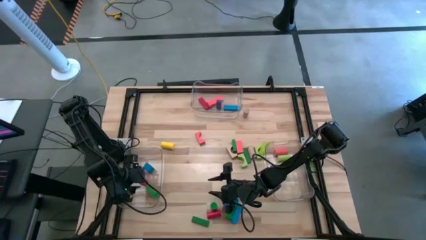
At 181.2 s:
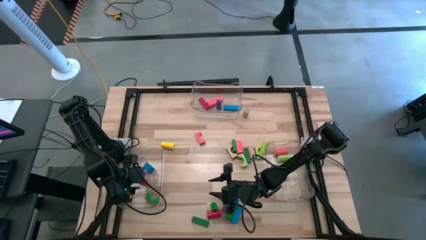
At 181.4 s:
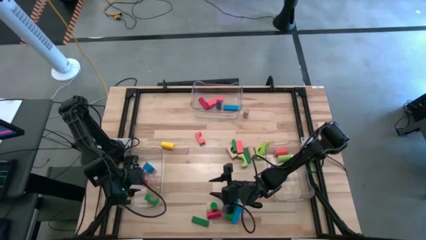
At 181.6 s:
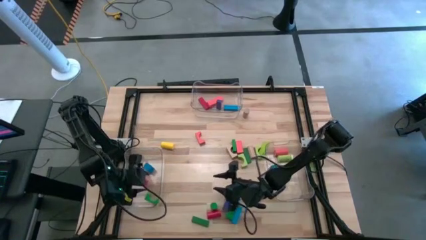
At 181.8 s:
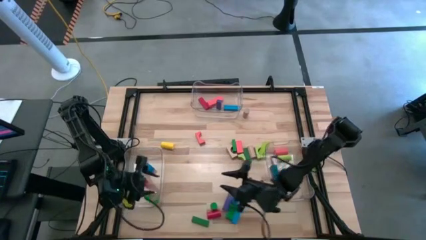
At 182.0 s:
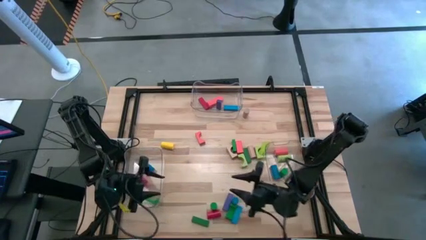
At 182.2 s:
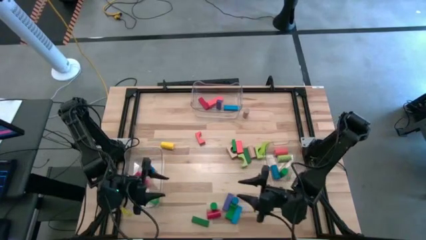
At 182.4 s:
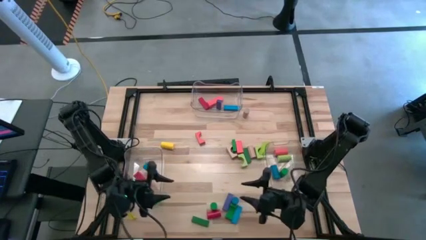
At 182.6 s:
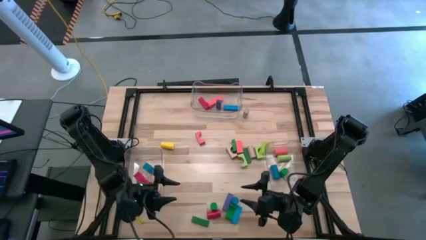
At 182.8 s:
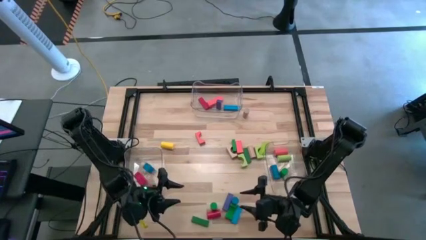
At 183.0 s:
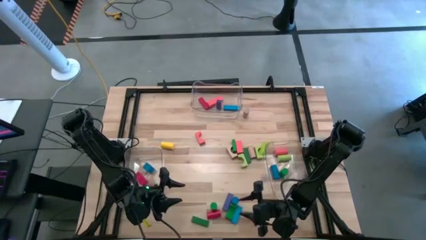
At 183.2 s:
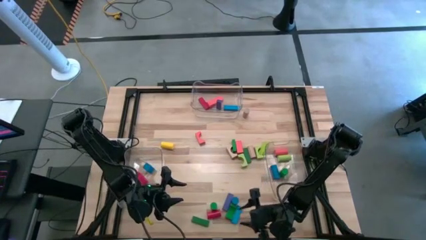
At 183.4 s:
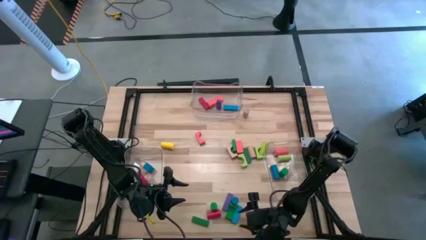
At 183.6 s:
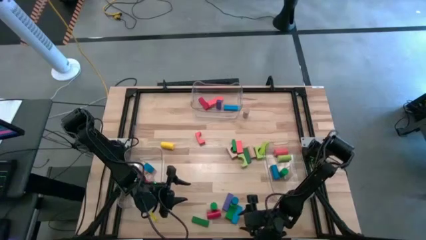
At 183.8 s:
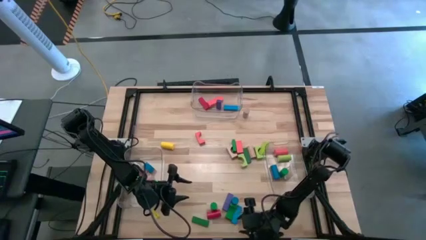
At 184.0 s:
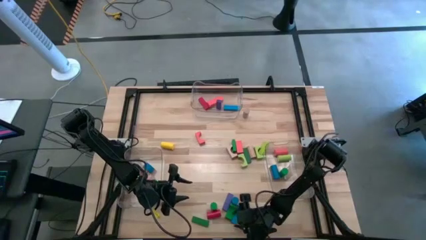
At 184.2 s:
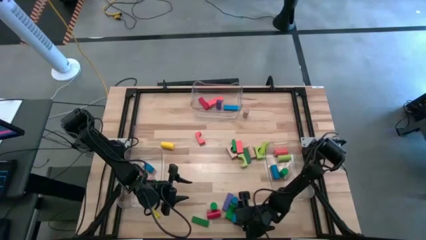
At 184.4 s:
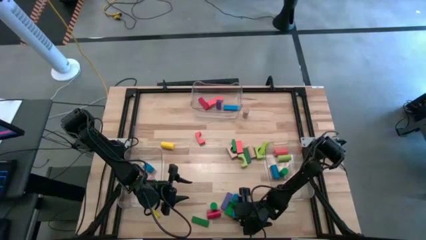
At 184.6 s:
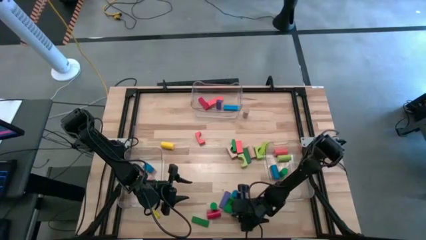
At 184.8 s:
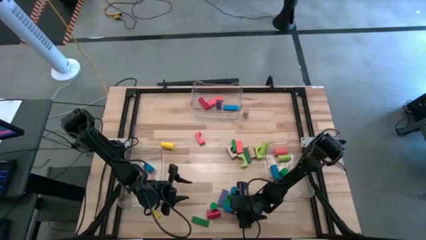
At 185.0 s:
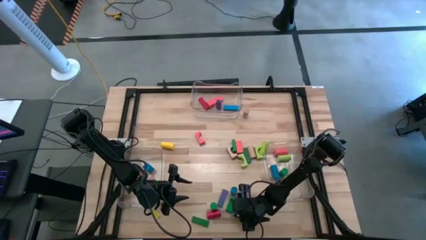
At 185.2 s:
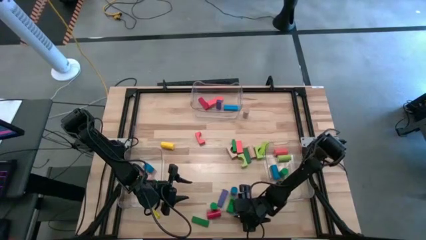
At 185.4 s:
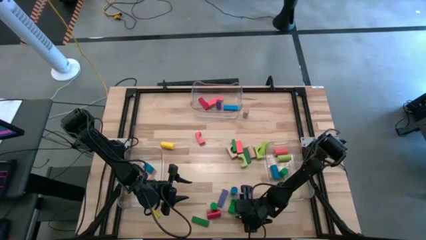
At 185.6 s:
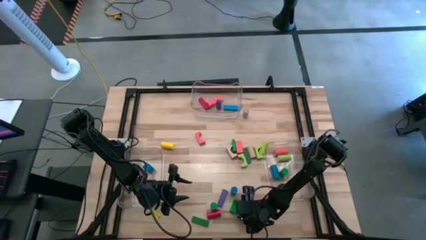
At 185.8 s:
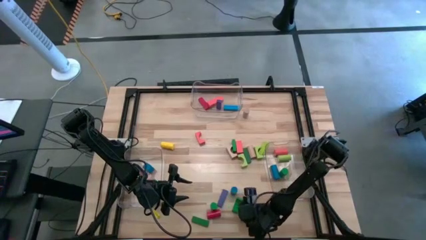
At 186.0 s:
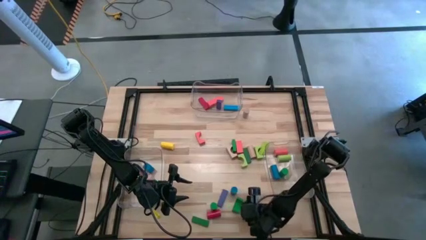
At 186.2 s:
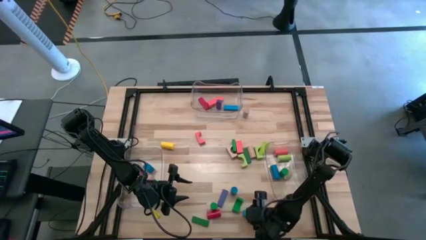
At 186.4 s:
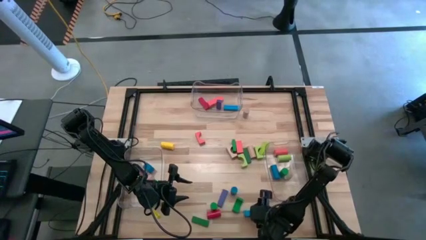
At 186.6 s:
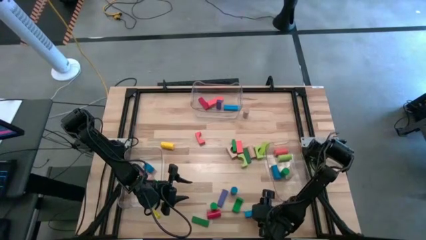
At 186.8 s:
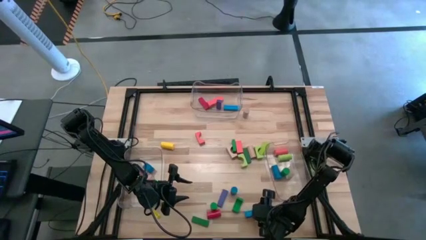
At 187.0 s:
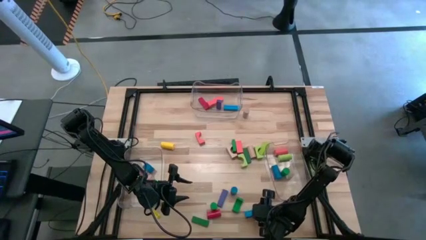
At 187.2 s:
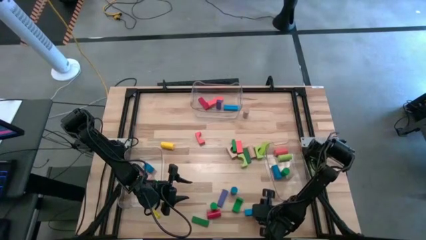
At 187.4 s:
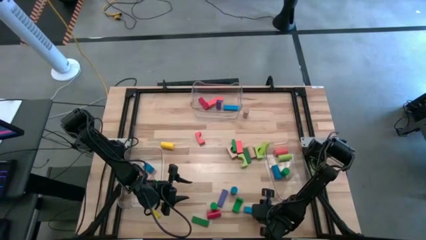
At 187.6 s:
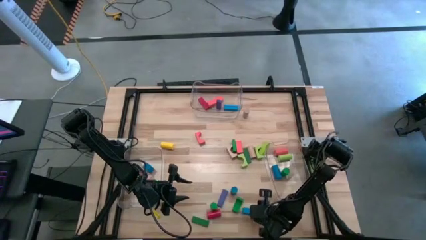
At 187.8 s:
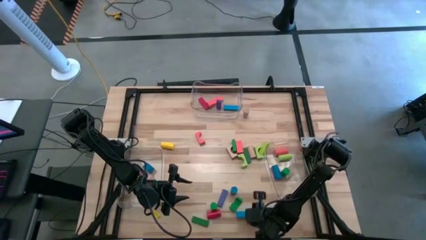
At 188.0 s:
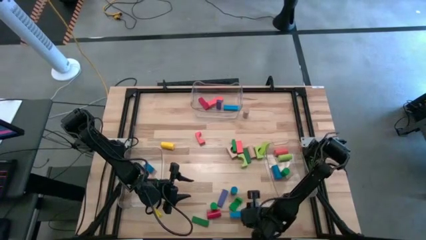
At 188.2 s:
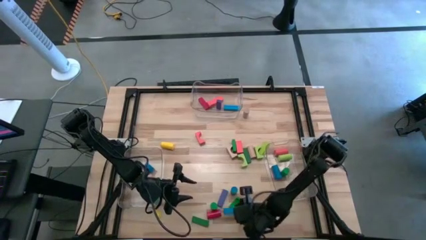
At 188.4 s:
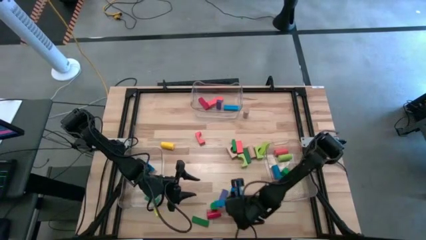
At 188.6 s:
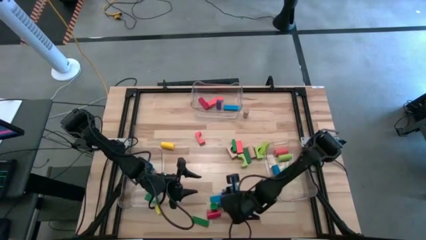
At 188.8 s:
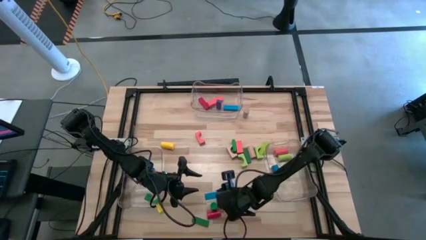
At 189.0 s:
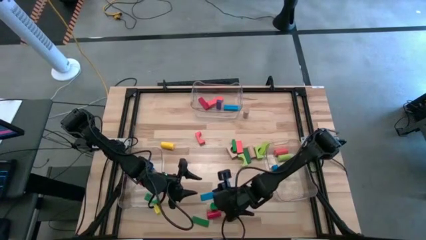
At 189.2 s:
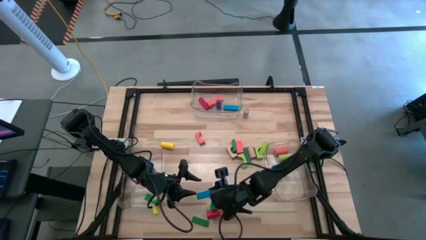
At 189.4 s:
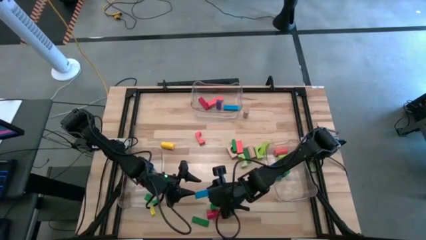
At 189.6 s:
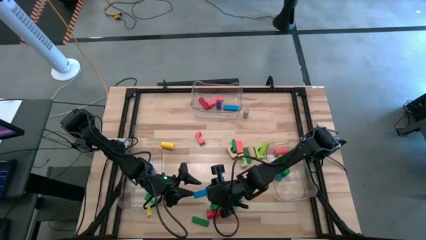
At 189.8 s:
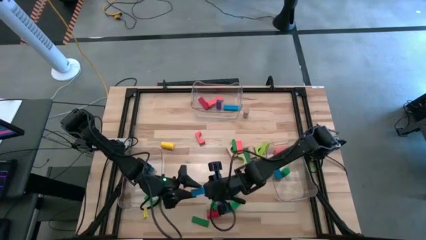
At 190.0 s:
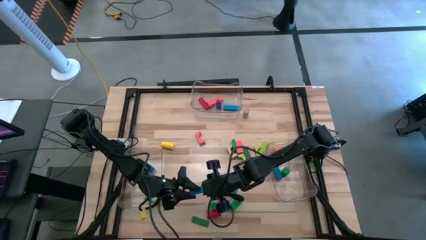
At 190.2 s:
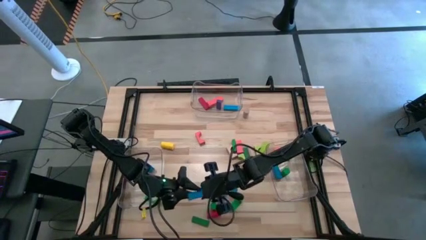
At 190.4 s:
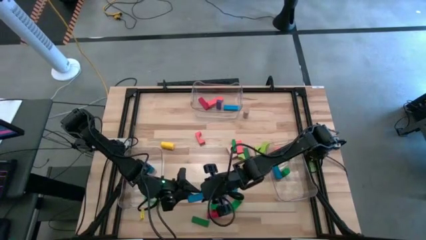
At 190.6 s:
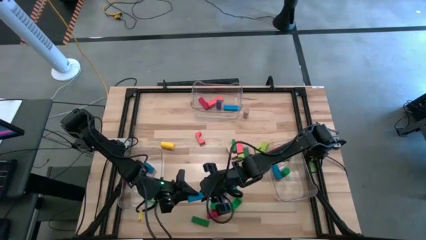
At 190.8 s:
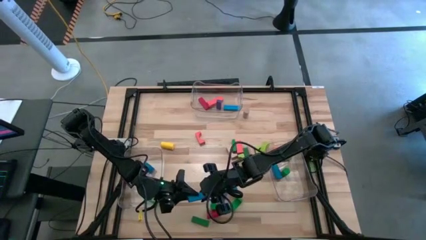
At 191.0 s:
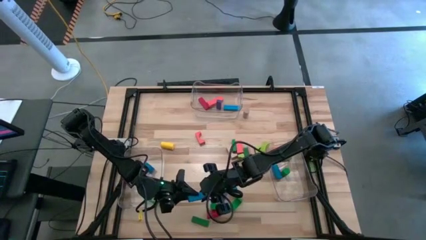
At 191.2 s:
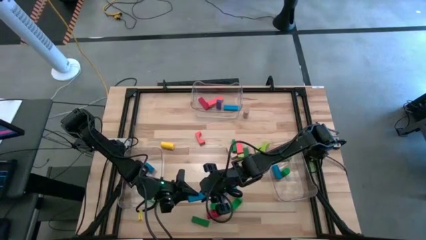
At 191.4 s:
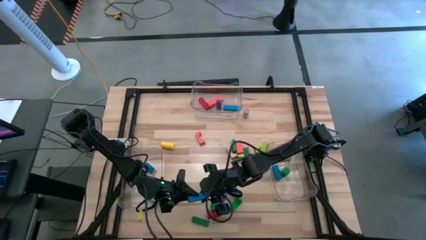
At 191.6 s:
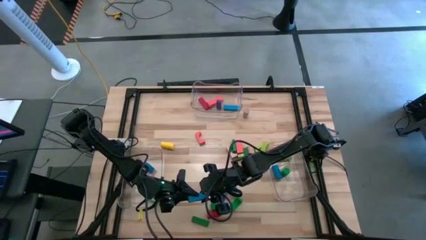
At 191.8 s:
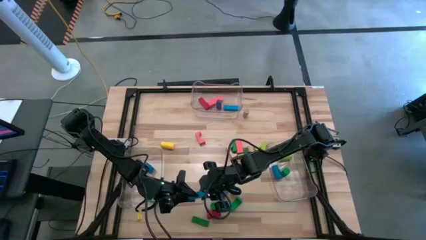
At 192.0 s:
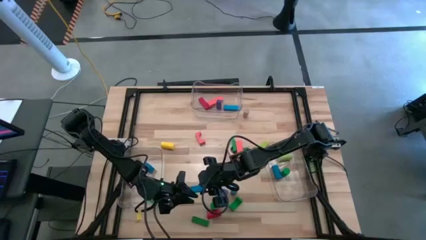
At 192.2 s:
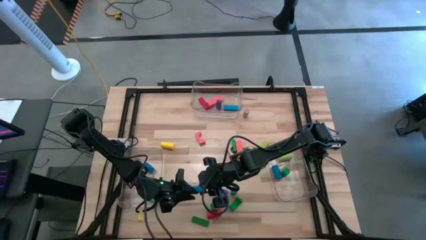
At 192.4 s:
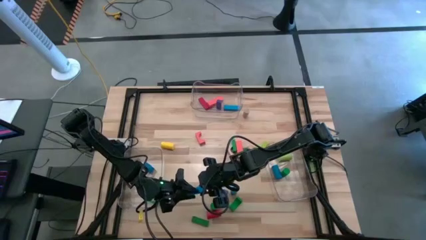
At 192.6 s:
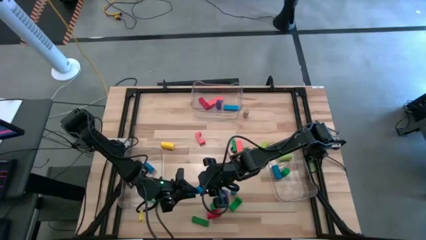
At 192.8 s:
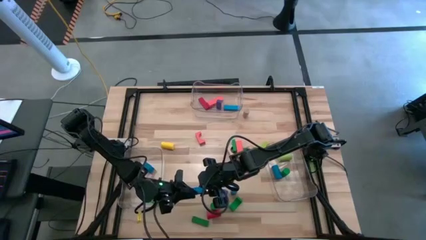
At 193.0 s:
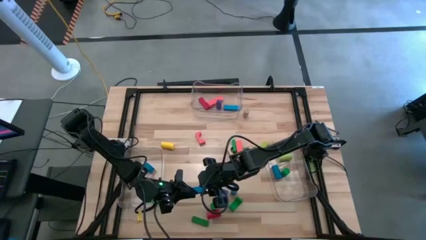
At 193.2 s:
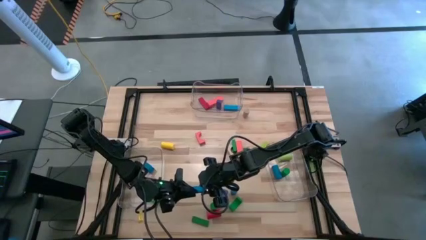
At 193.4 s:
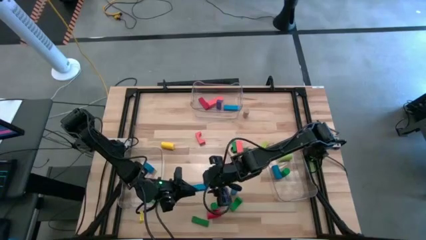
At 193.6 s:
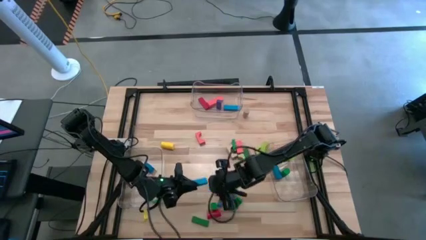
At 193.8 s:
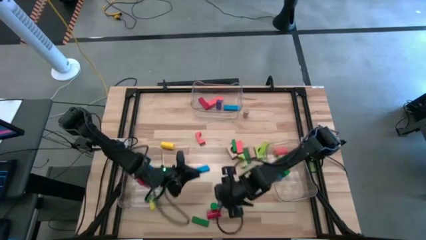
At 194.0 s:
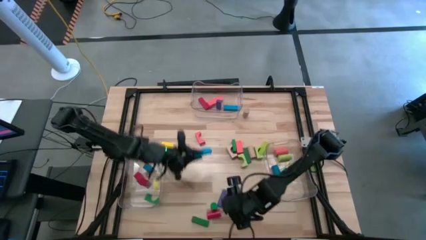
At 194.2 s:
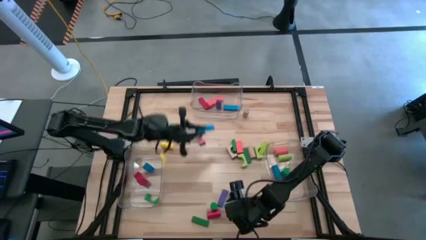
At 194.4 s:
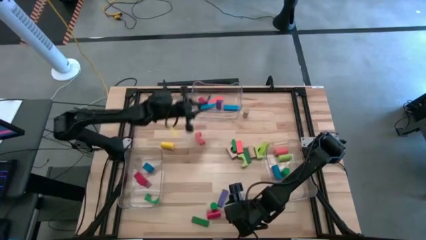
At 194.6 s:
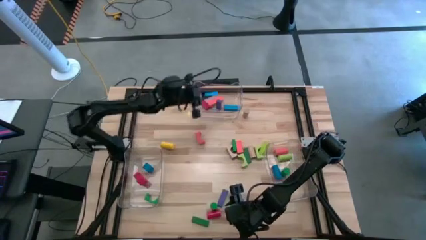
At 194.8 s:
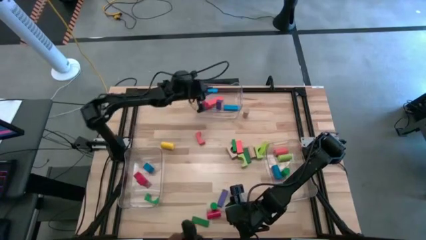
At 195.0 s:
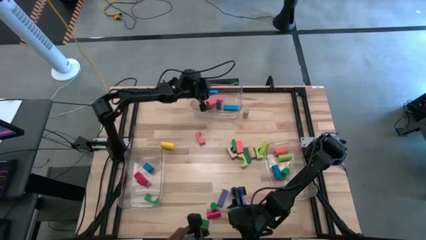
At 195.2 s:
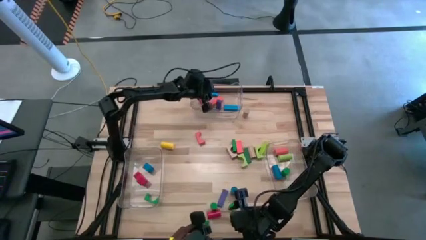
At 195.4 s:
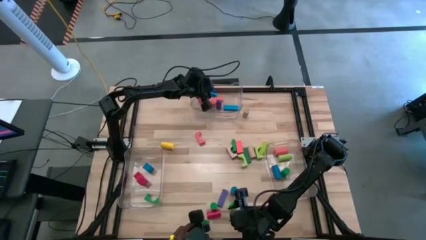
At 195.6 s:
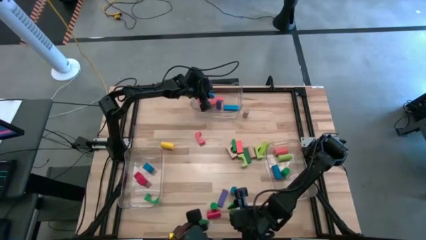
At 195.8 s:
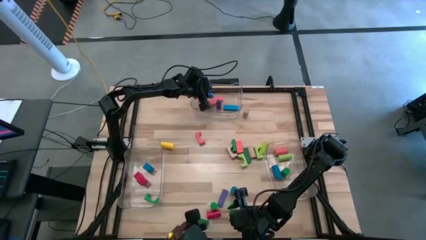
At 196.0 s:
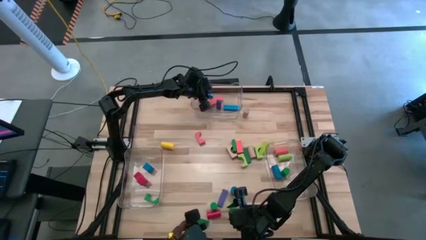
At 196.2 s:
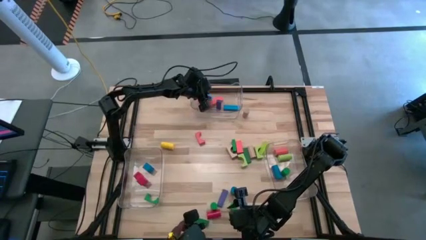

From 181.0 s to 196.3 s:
Task: Sort blocks by size
Put the light blue rectangular block into the top transparent bin
